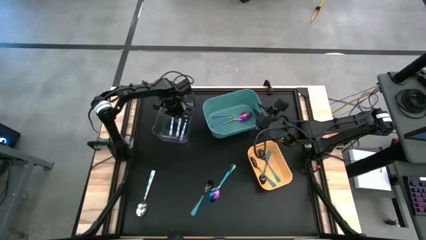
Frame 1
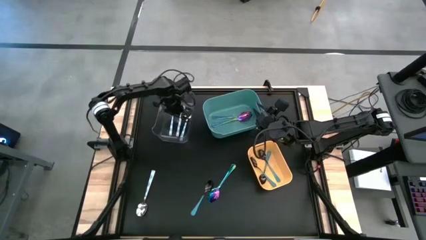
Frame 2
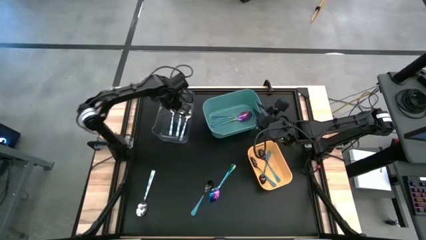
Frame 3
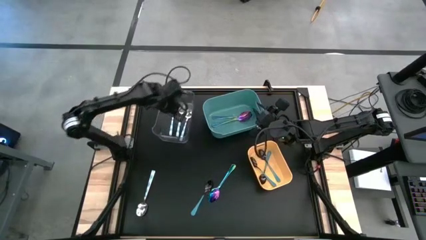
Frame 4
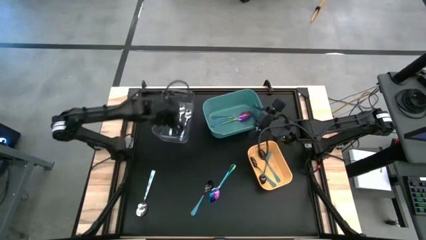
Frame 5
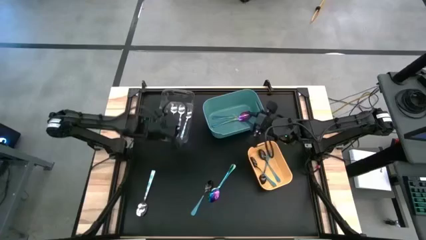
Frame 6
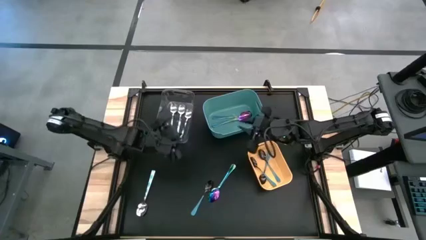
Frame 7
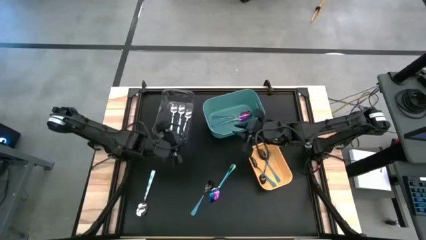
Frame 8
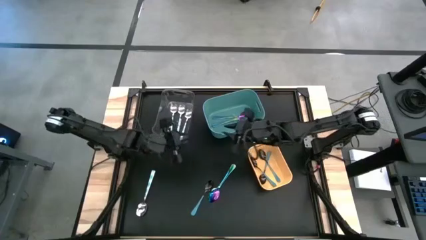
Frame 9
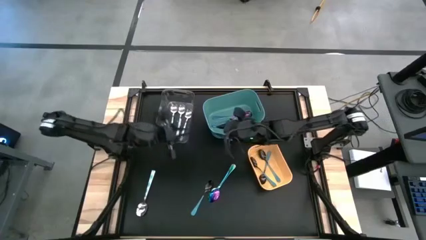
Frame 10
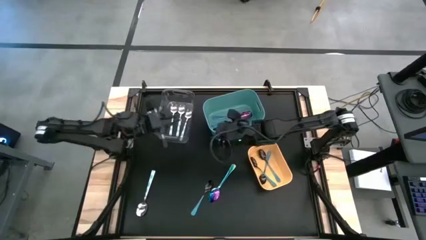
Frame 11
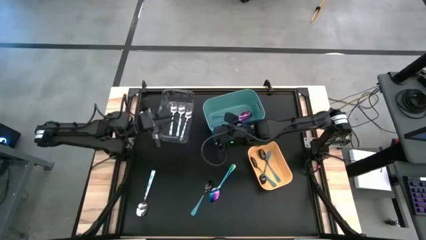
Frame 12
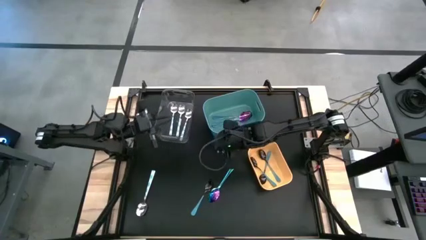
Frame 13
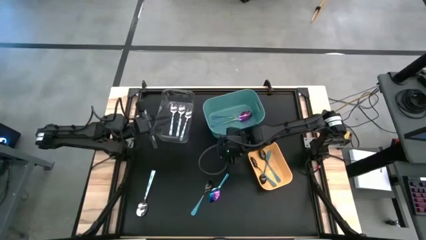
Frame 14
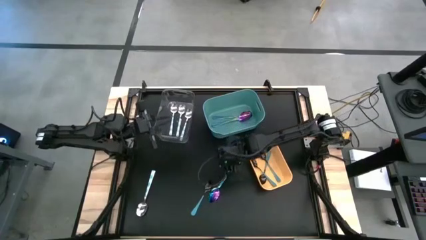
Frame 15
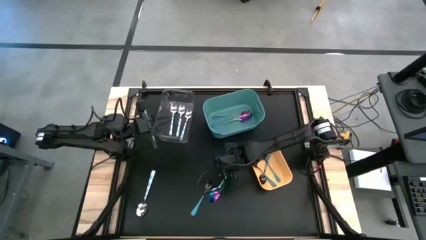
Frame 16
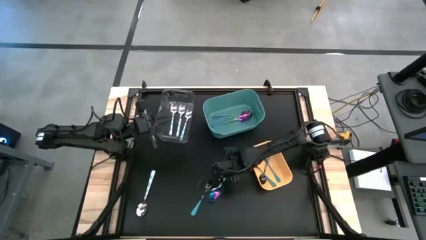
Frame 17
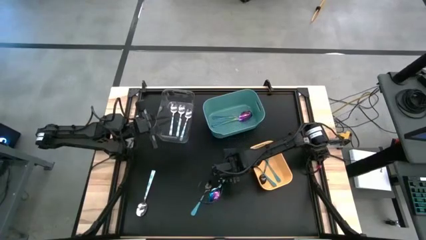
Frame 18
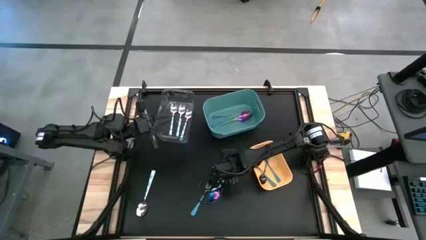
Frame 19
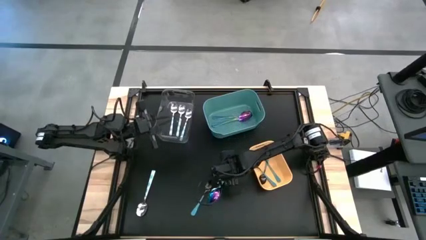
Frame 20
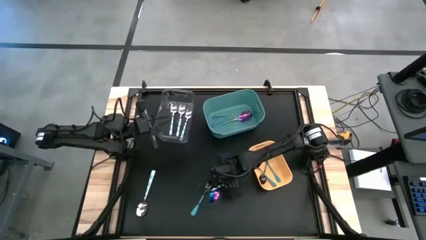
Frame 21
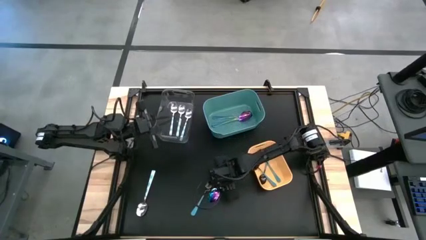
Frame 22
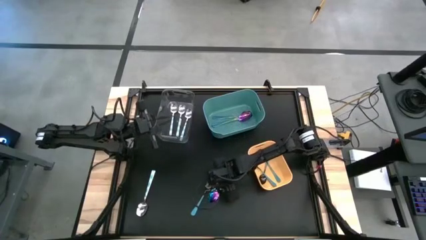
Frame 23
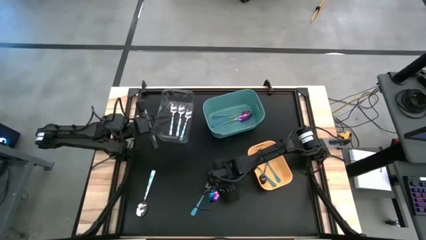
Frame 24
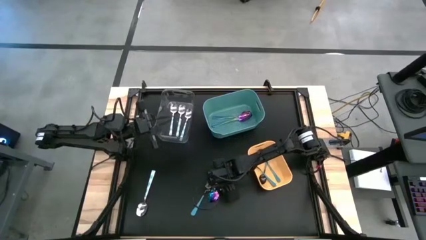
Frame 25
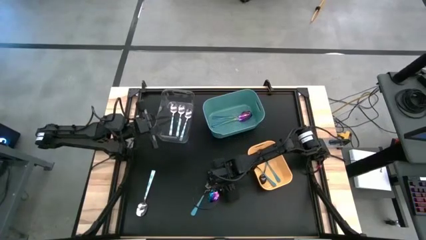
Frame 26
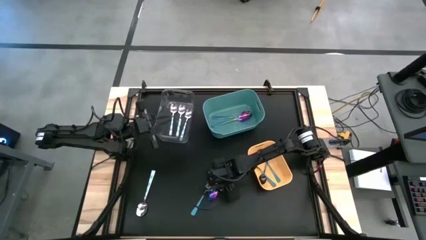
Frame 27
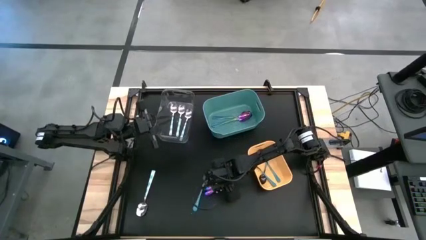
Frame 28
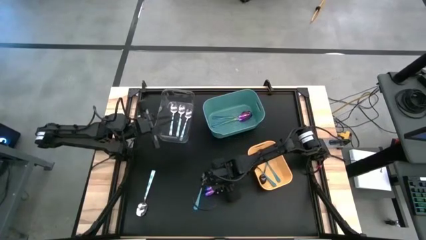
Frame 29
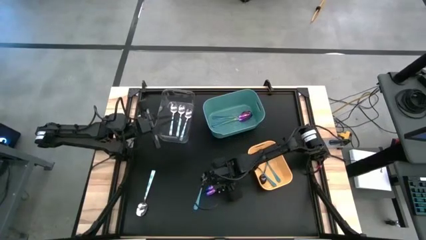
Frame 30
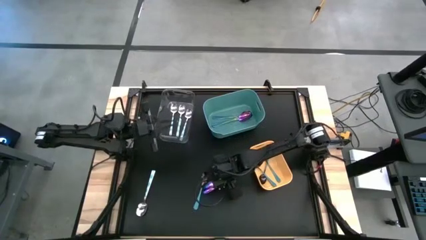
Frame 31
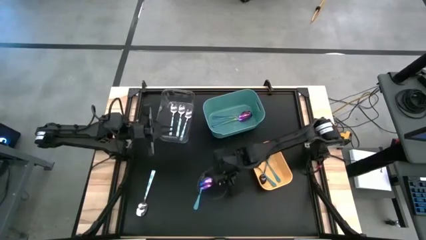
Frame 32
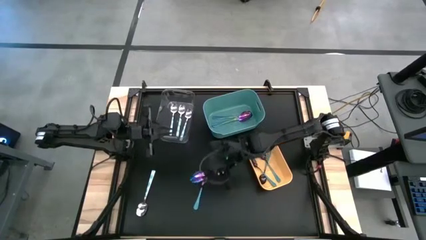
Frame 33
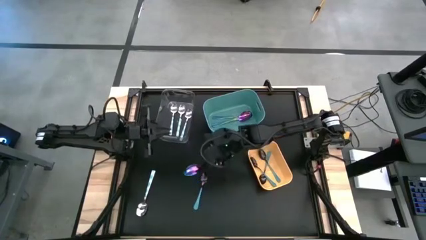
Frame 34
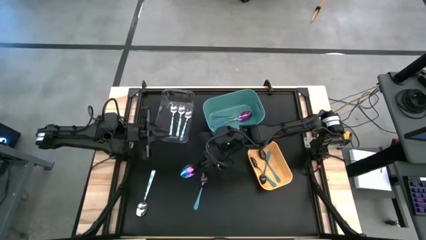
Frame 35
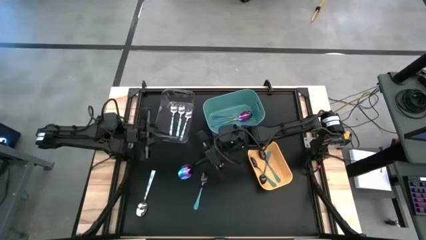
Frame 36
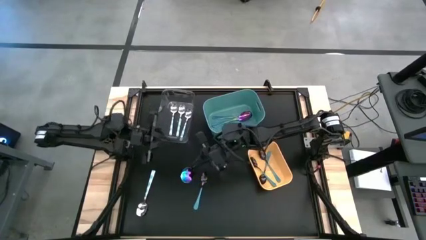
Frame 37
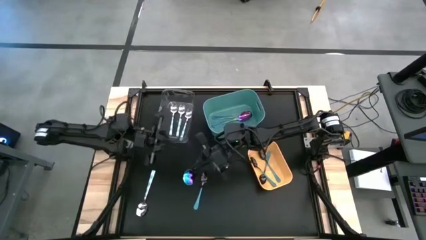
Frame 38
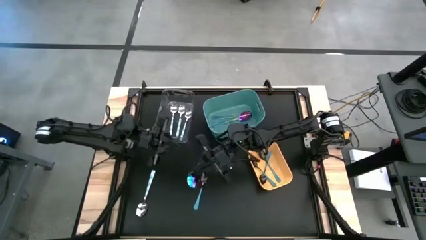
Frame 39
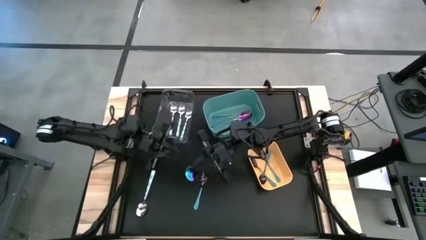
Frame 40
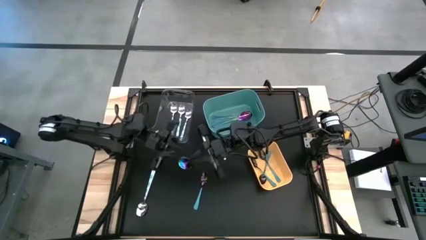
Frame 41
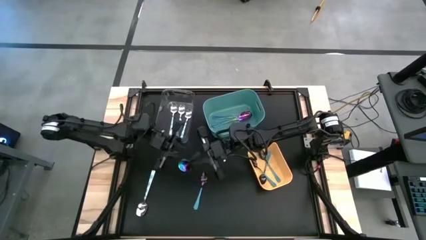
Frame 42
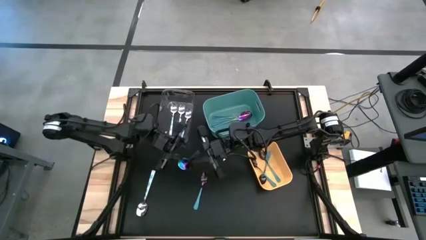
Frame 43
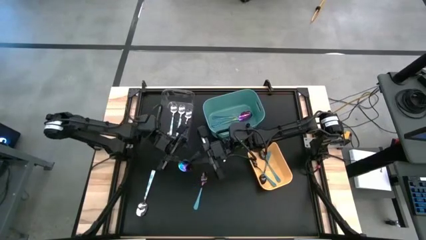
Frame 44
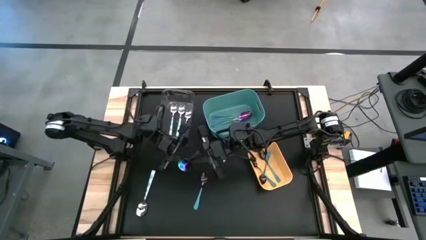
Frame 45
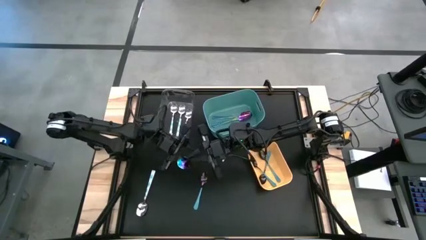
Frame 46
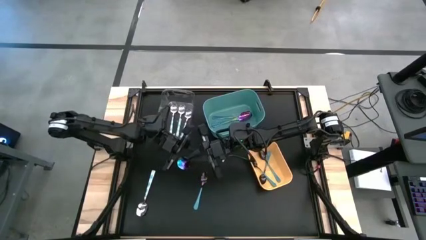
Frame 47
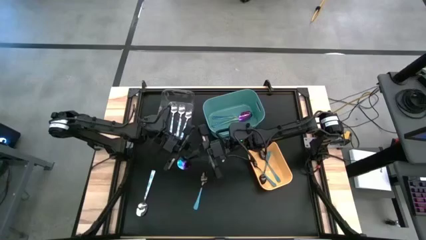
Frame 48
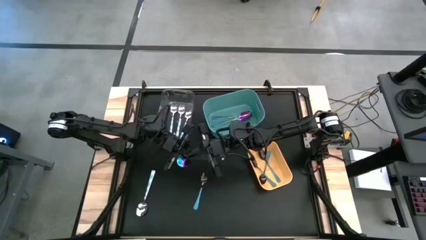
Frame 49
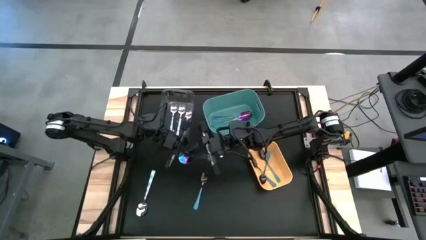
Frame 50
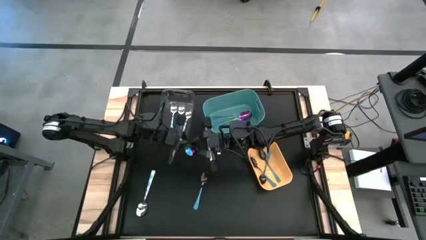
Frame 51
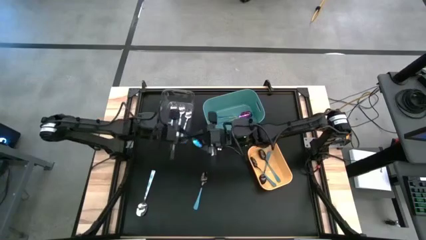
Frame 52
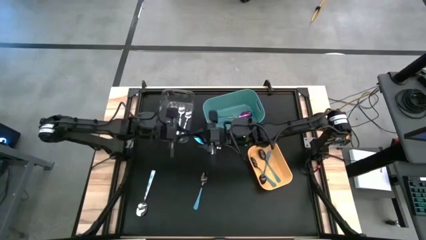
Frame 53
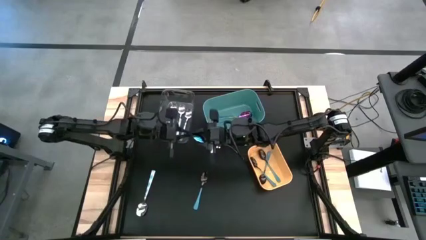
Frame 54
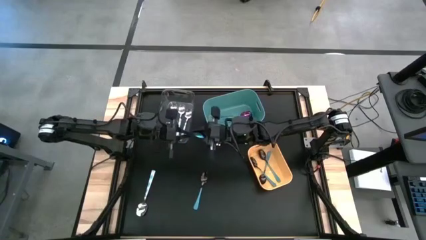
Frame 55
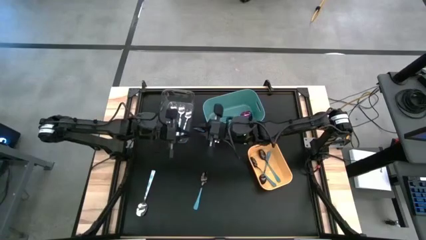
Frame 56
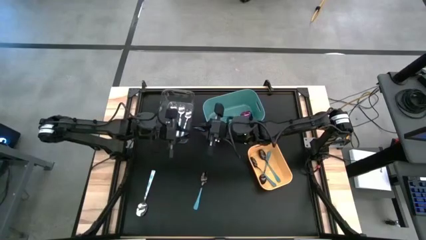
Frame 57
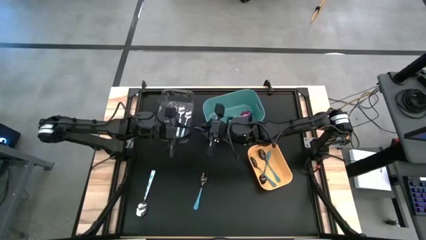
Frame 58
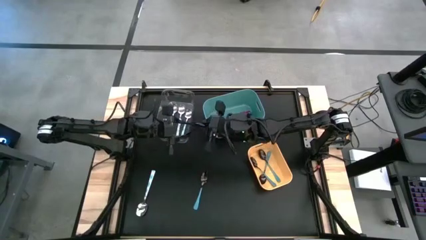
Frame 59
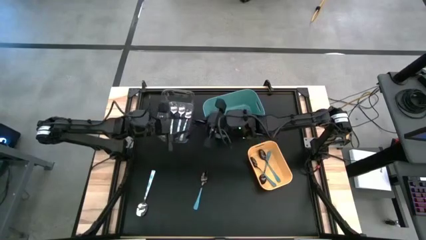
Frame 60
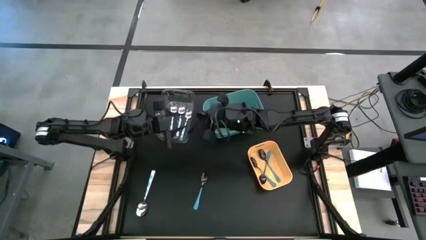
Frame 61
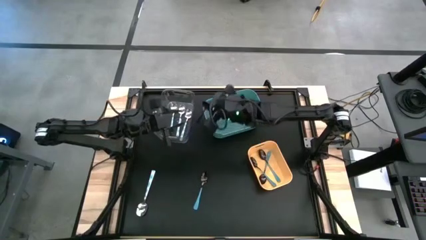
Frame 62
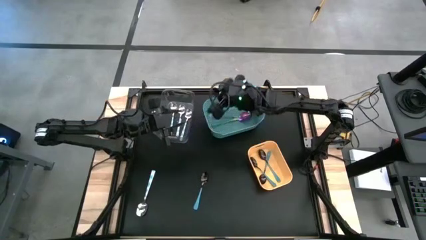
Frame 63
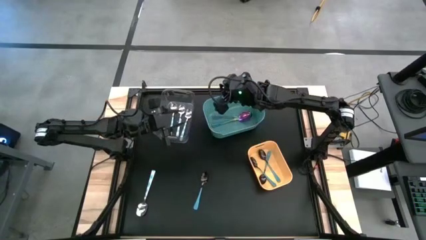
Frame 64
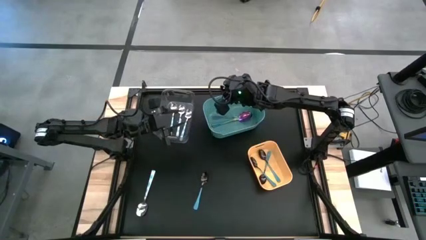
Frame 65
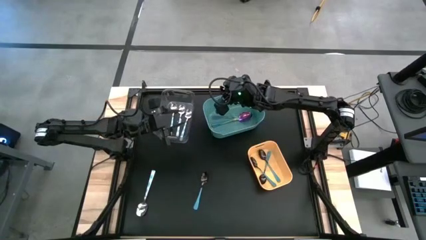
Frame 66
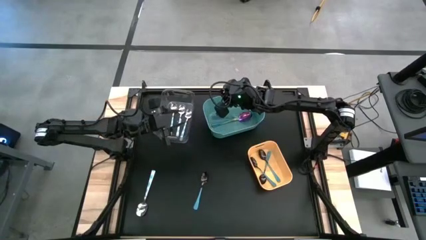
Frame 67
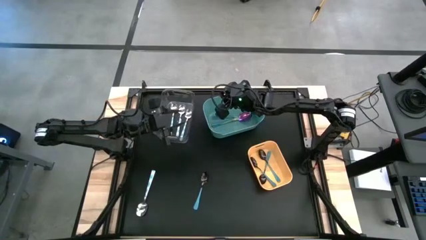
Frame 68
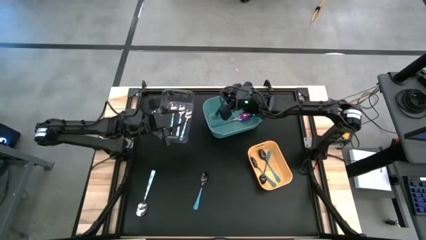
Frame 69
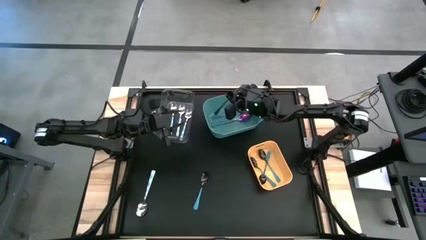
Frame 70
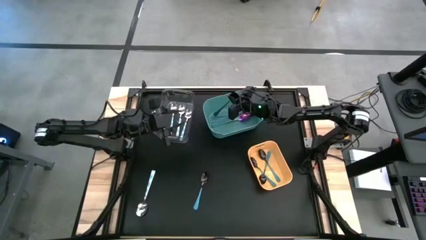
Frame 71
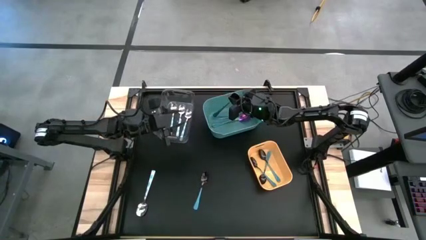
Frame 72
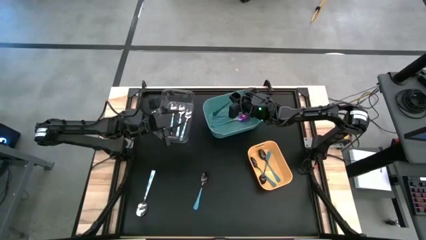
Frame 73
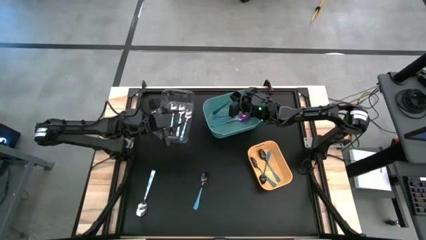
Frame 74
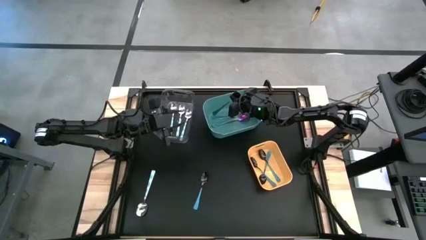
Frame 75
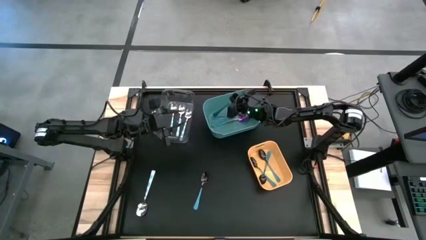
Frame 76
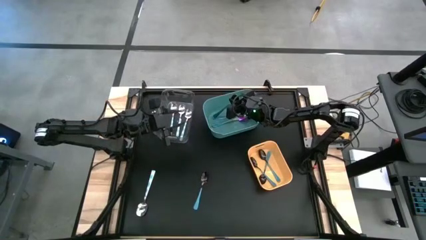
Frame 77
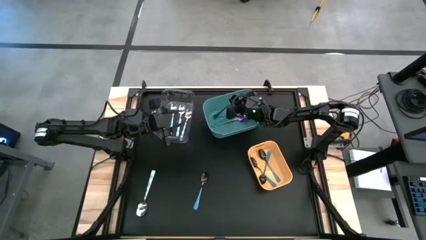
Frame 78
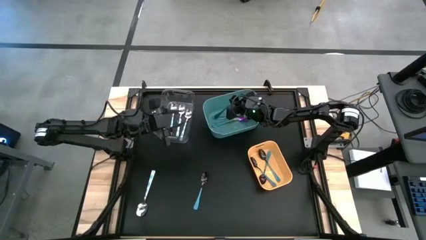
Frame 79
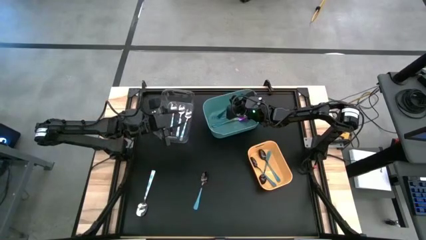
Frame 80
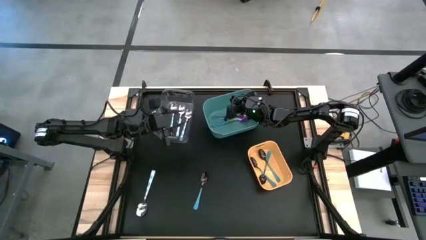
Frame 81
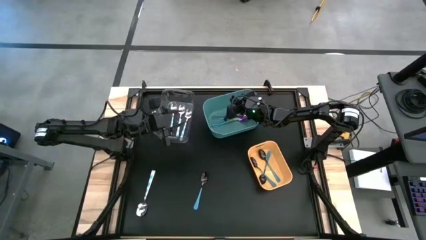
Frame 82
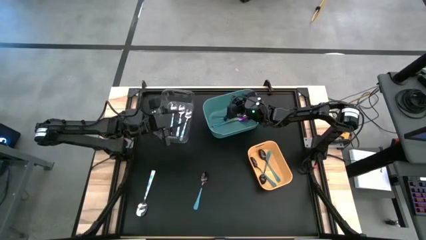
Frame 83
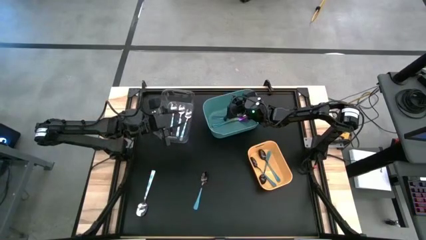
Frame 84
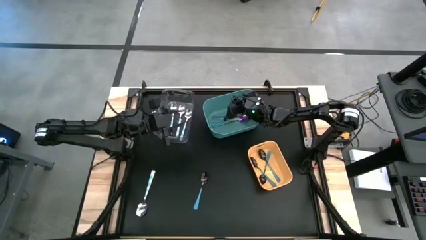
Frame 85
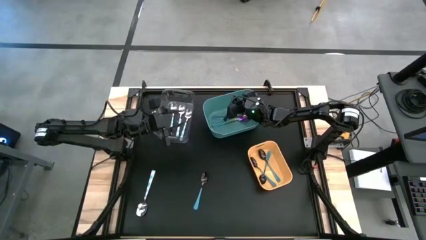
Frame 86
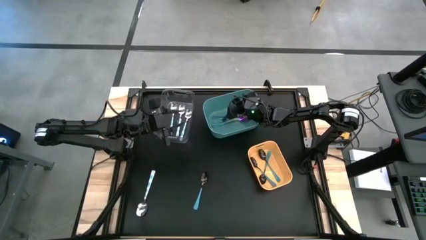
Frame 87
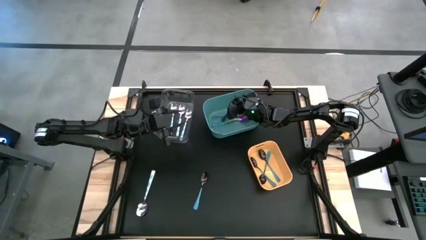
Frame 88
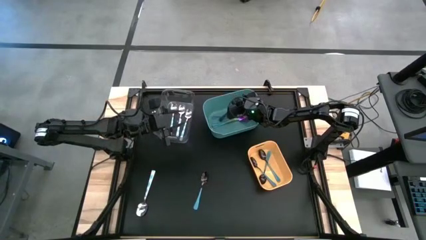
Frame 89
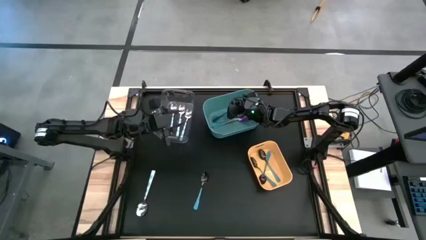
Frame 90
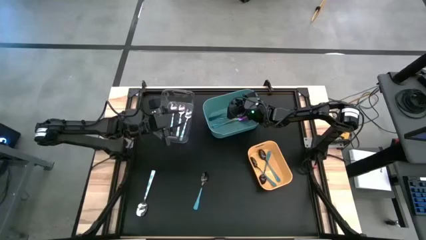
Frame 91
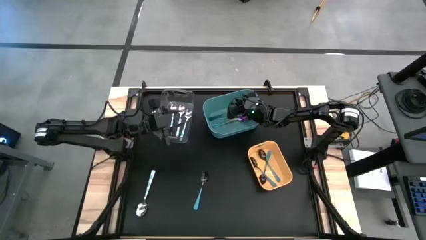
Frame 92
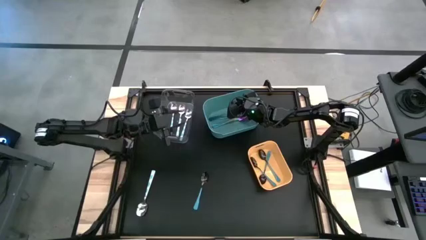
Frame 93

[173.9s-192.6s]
Task: Sort silverware by color (type)
Put the purple spoon into the green bin
